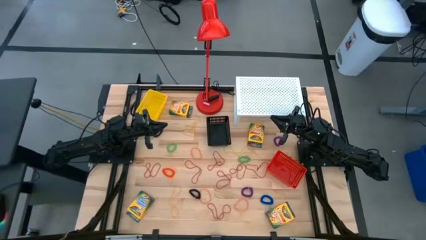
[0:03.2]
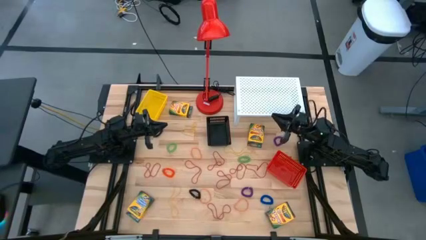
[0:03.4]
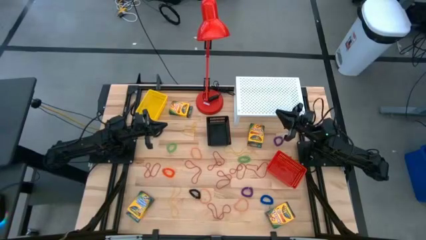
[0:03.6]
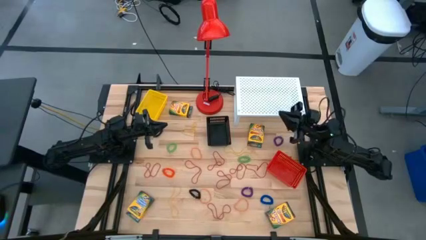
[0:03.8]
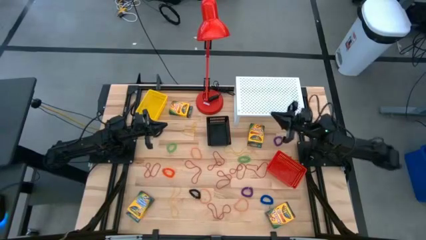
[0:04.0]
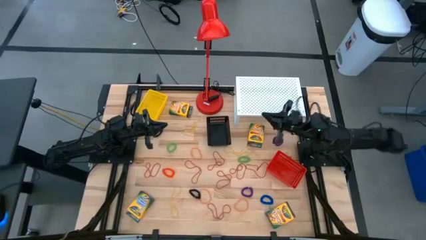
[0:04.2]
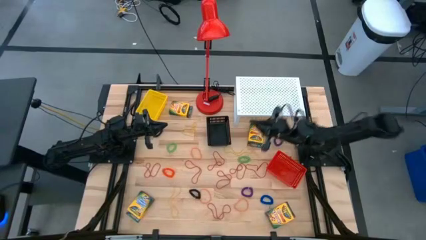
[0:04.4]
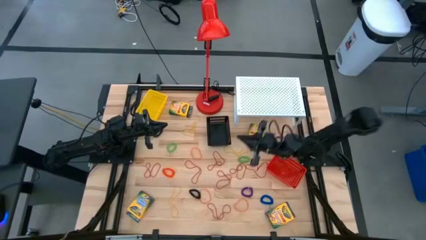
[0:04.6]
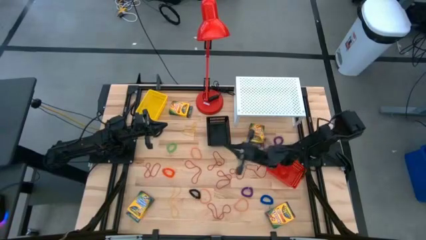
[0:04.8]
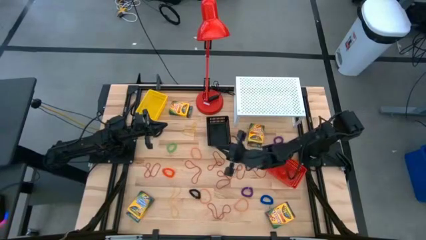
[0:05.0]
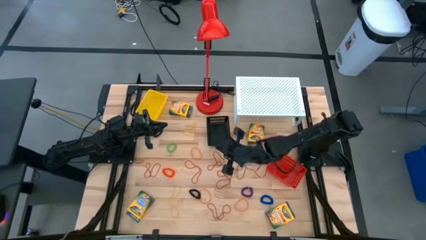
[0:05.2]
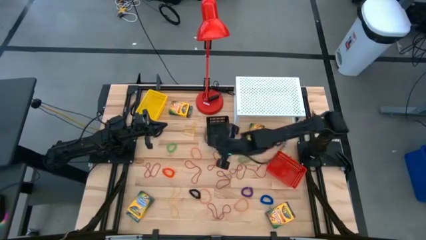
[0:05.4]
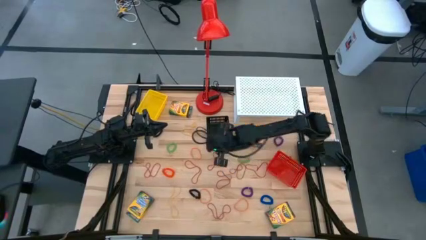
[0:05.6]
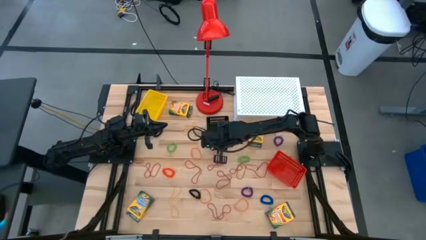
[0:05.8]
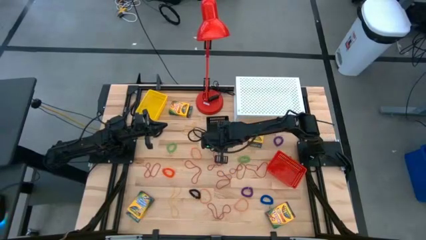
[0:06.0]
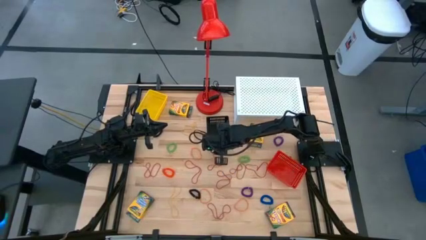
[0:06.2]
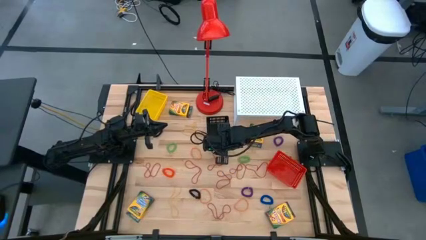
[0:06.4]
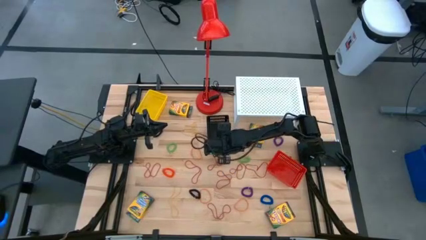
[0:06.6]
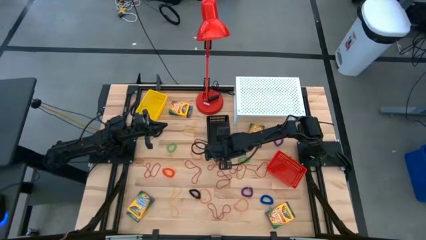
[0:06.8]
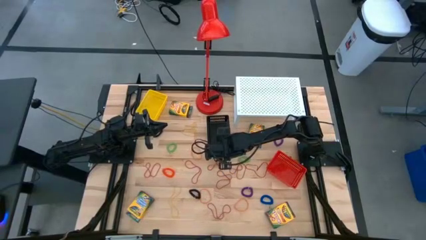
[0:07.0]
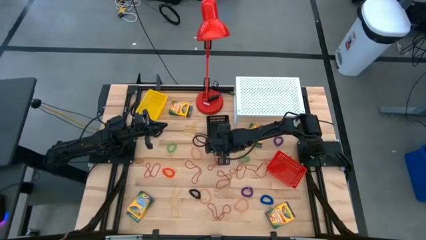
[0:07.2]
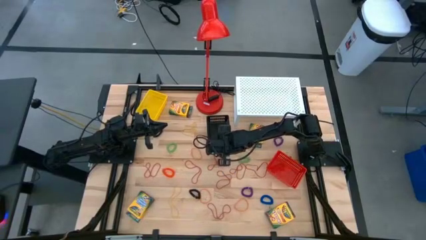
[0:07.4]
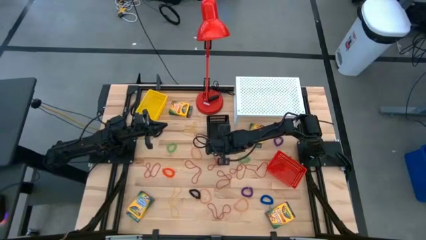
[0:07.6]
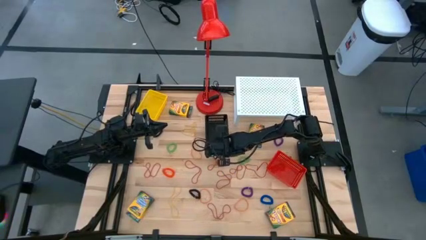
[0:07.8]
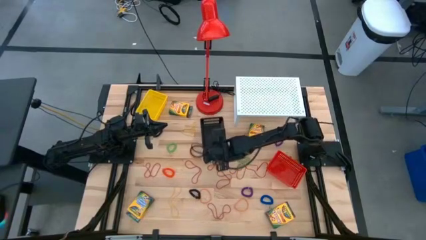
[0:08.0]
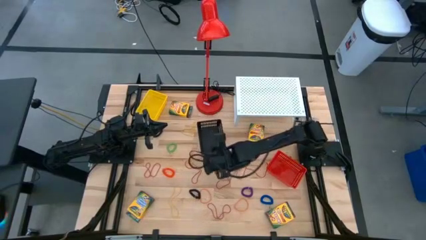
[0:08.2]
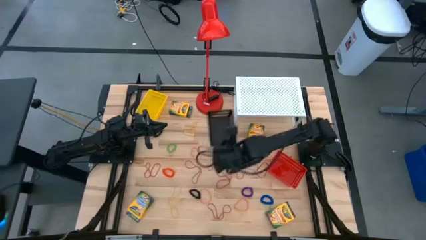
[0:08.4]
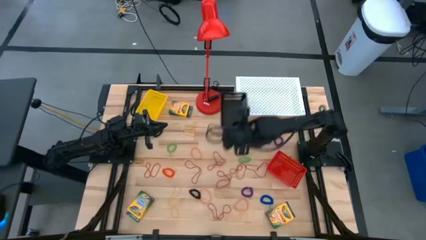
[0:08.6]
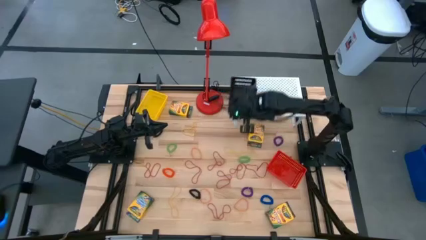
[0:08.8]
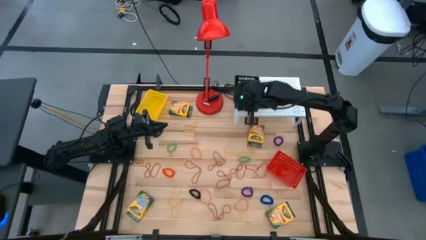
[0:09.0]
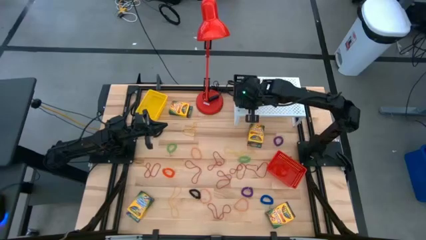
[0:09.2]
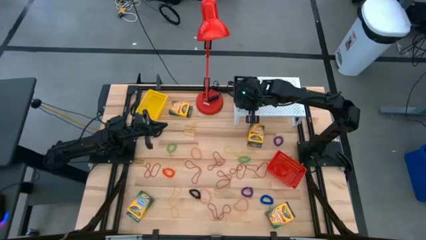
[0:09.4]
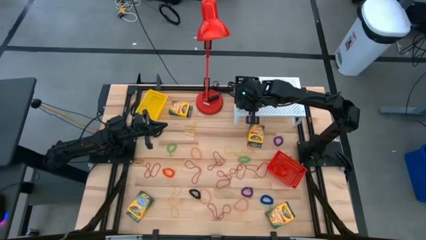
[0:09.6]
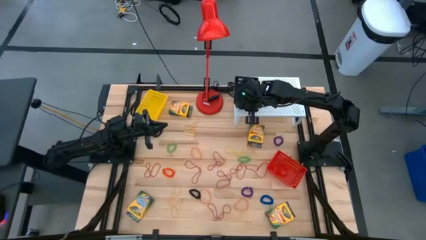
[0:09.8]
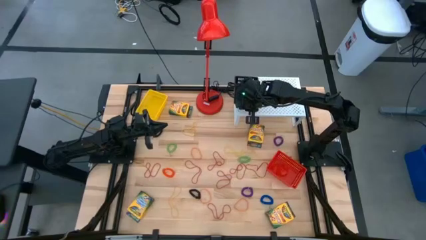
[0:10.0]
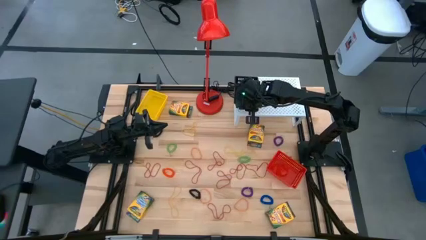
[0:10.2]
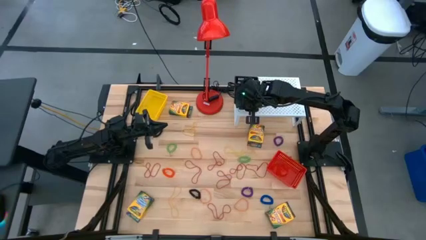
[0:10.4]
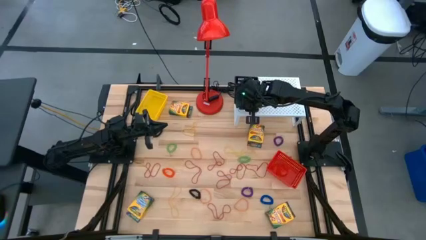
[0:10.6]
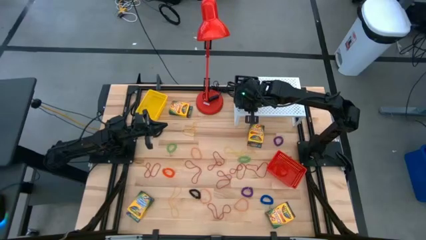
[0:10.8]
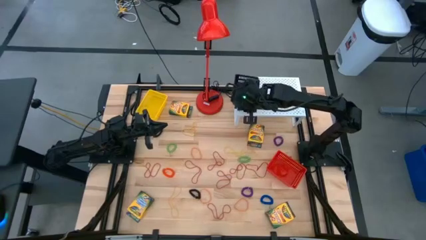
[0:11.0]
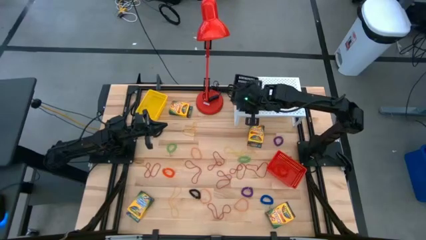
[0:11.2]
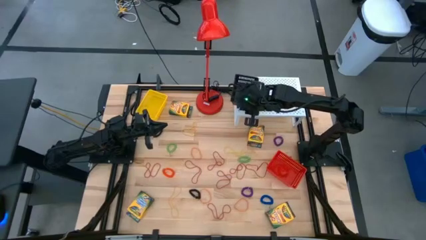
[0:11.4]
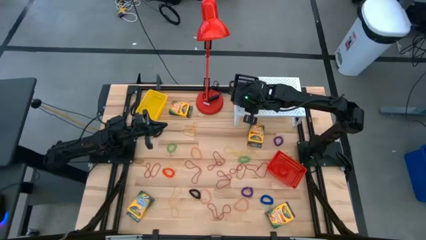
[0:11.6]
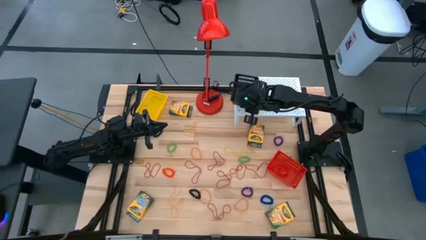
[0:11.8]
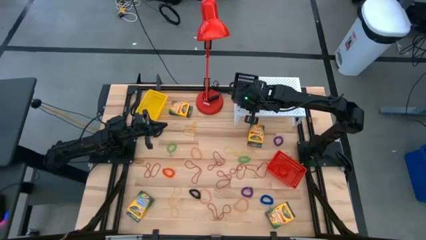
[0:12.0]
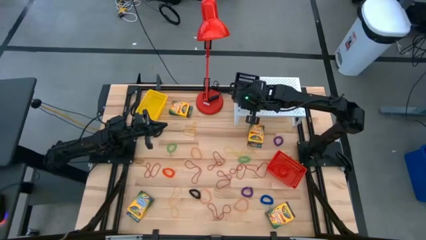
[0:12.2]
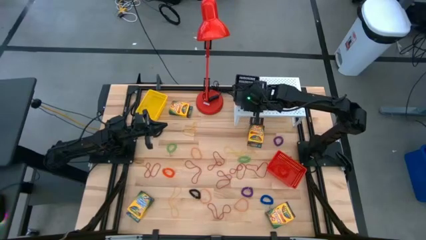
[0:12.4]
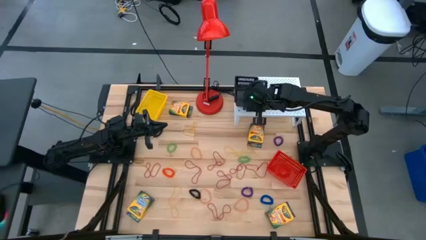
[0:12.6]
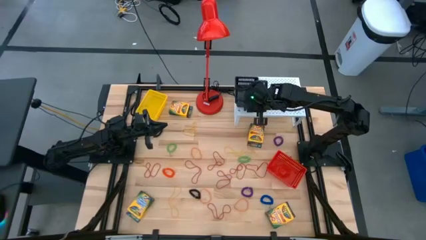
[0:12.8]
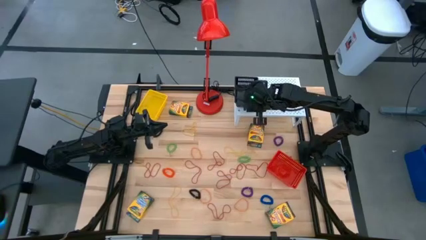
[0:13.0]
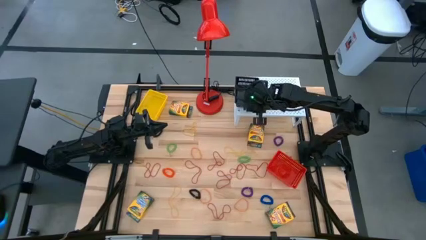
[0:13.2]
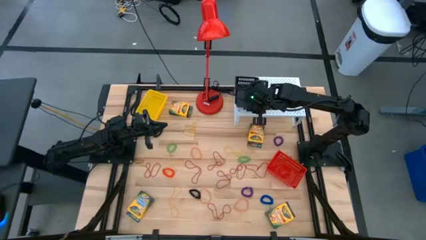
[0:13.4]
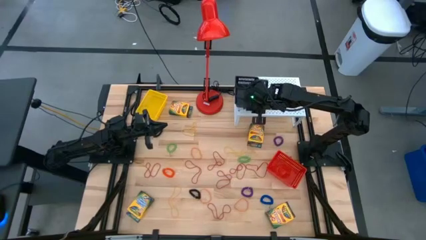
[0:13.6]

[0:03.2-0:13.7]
Task: Pick & Place Office Desk Supplies
Put the black bin onto the shelf
